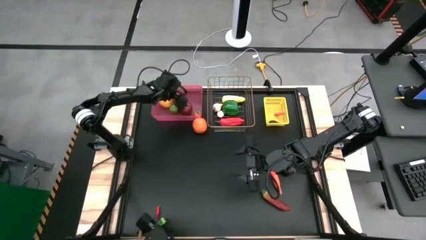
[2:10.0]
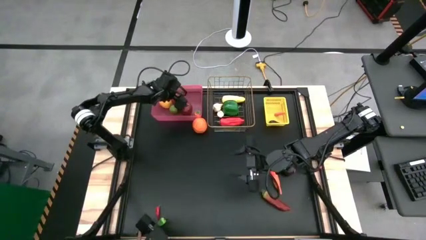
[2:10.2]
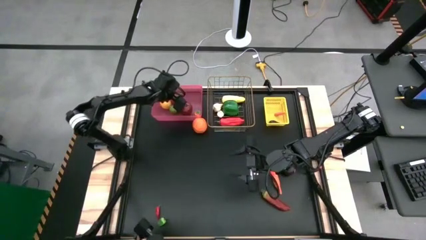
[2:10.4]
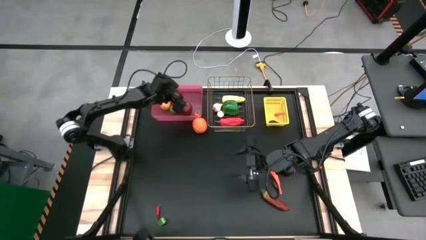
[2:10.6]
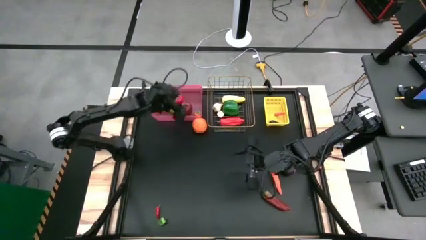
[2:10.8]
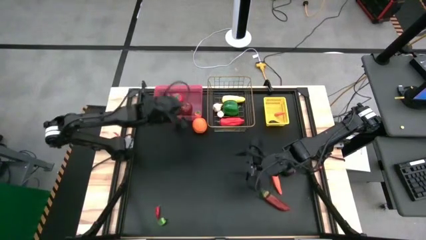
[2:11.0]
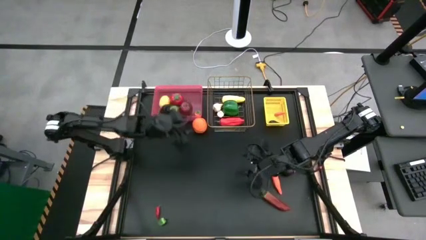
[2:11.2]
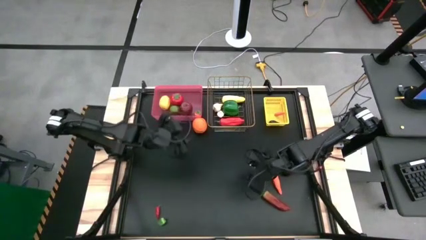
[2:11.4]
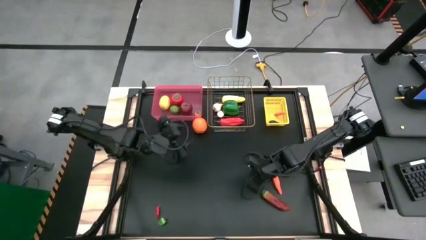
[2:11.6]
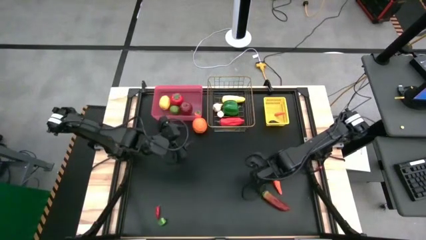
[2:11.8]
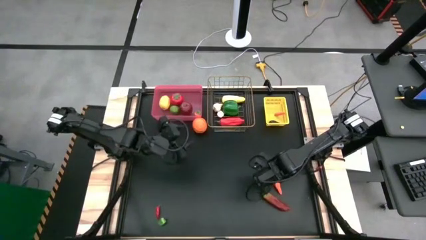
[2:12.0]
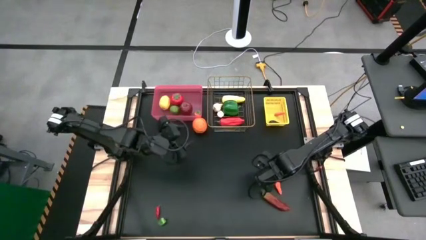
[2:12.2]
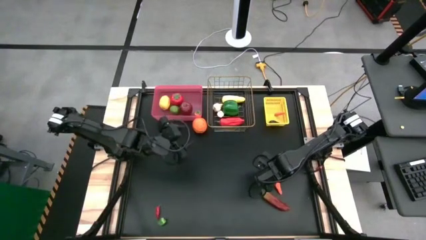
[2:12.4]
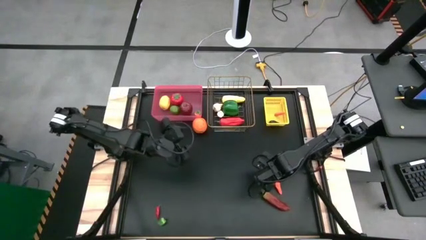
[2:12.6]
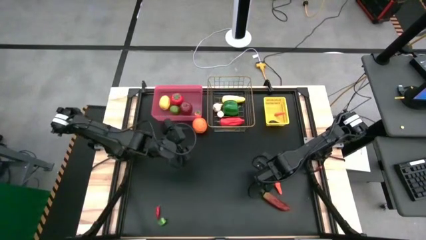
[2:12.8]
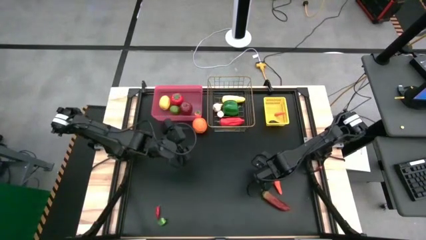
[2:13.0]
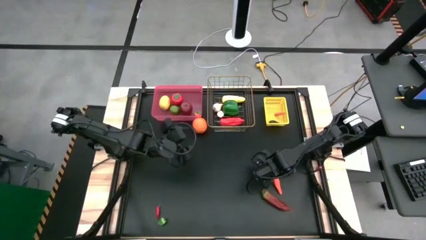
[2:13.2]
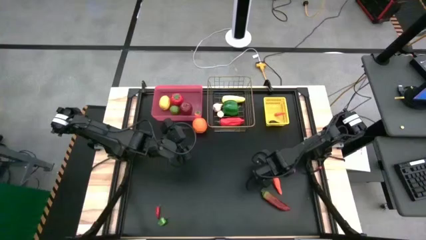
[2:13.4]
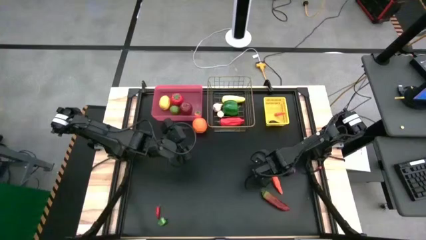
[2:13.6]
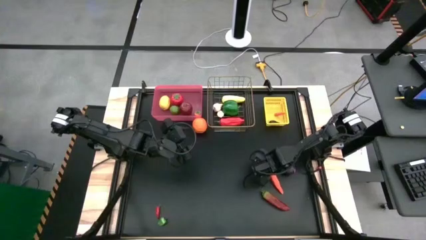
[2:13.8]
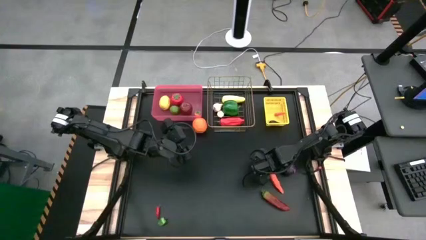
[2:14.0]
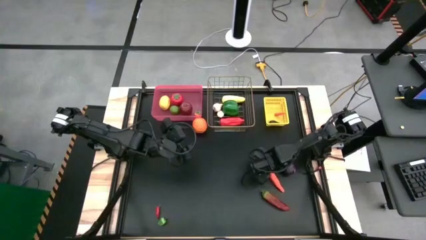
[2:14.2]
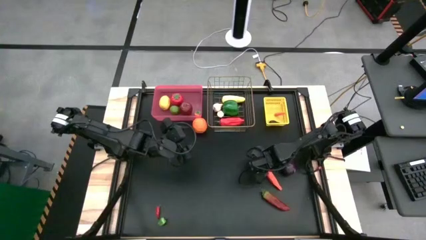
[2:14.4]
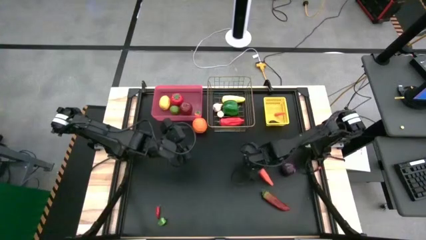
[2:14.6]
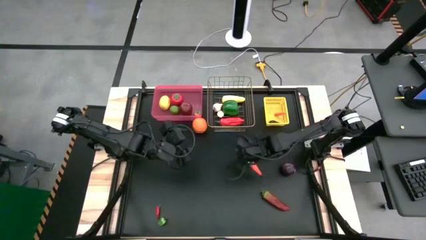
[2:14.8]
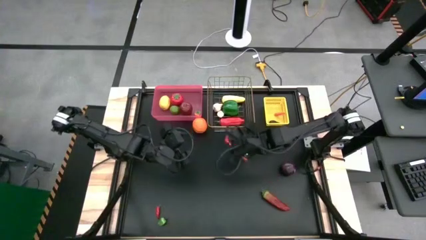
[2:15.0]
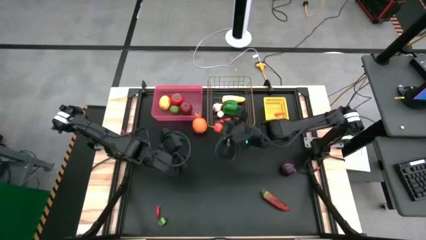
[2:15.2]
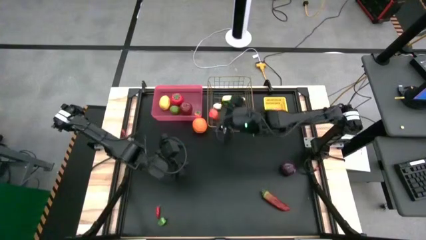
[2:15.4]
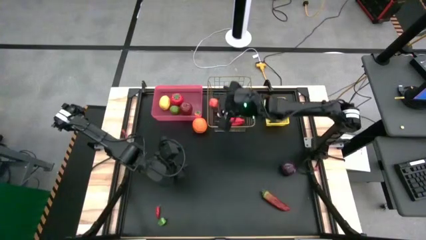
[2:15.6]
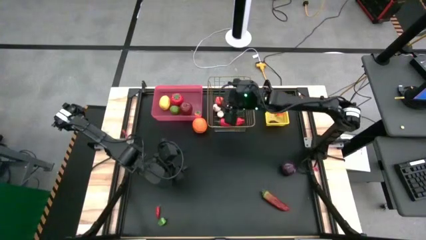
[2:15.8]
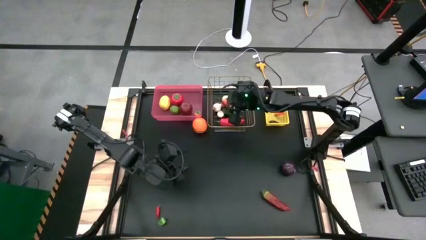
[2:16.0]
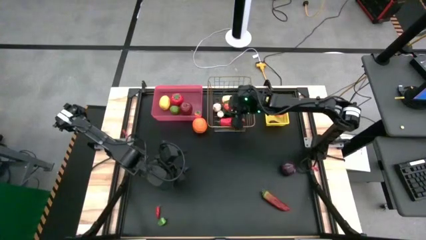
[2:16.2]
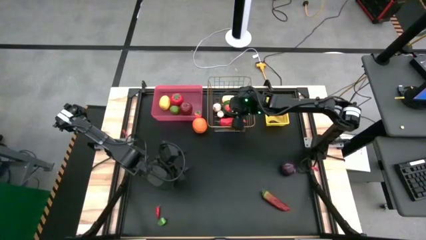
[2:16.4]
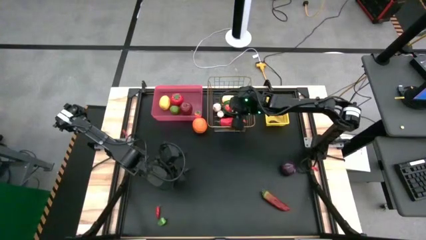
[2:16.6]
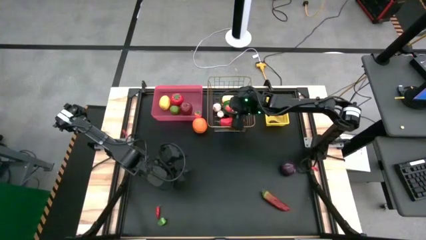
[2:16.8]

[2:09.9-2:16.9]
Task: Sort produce into baskets
Put the big orange carrot into the gold mesh basket

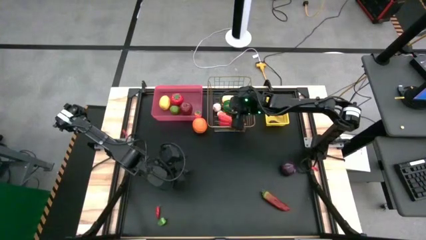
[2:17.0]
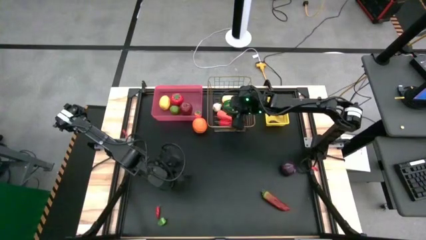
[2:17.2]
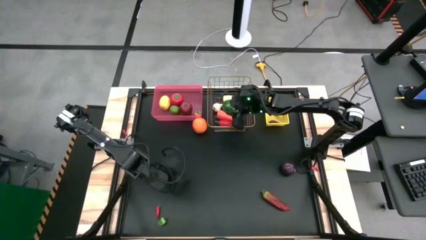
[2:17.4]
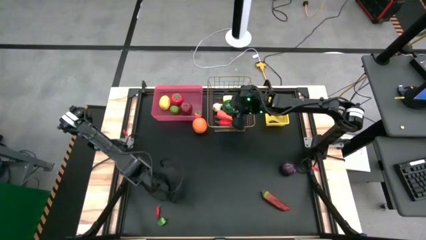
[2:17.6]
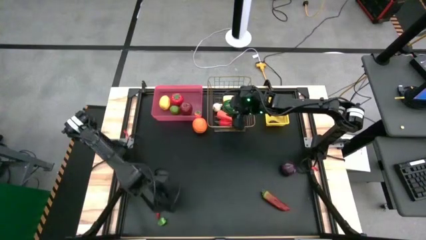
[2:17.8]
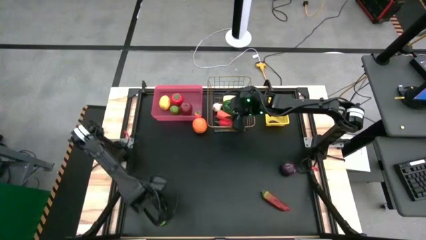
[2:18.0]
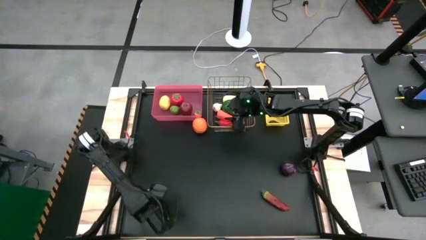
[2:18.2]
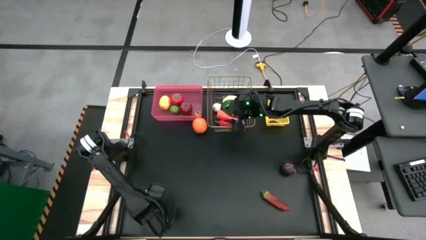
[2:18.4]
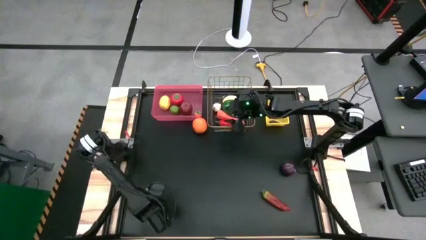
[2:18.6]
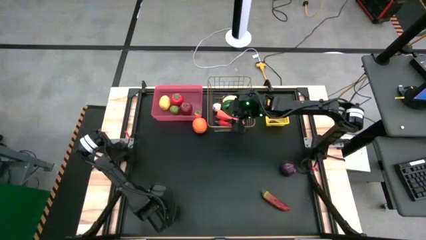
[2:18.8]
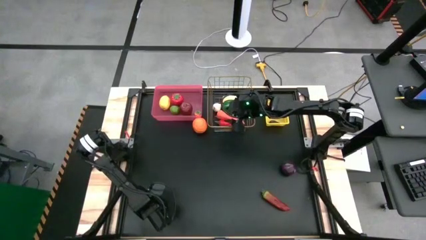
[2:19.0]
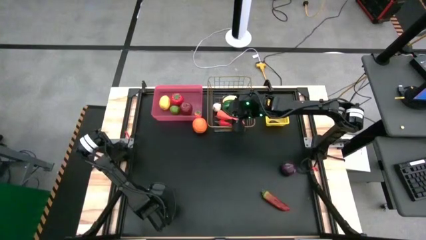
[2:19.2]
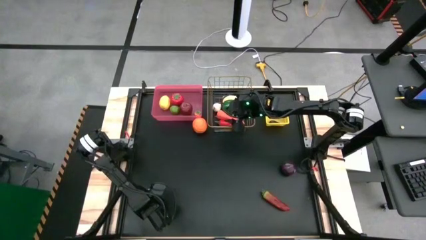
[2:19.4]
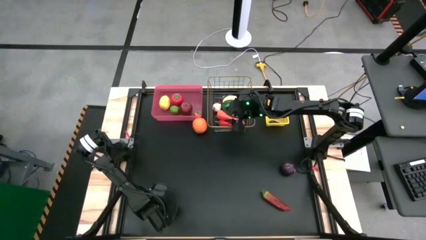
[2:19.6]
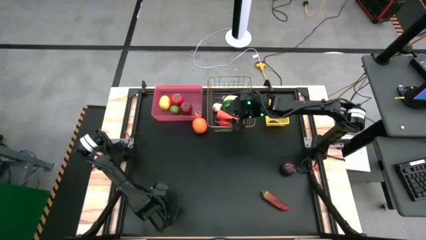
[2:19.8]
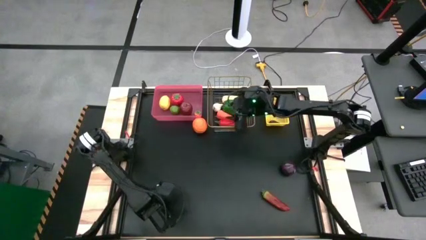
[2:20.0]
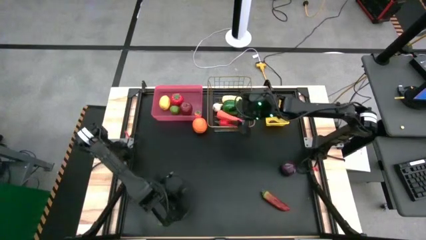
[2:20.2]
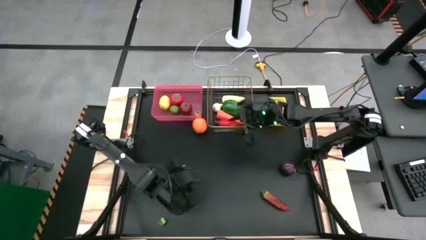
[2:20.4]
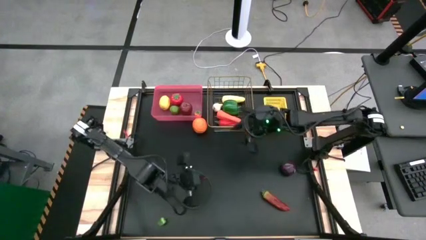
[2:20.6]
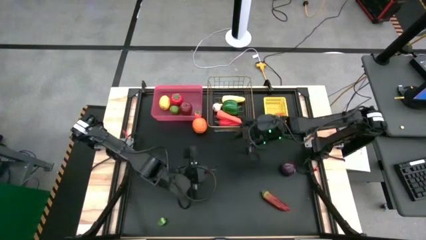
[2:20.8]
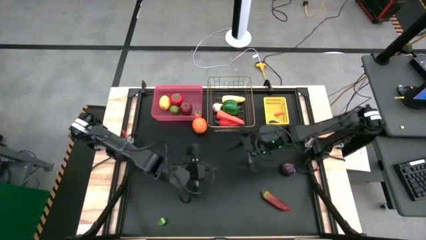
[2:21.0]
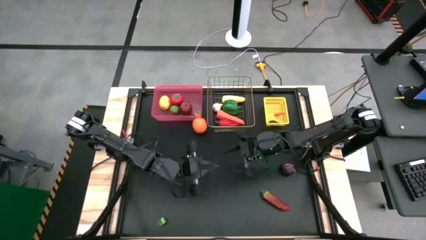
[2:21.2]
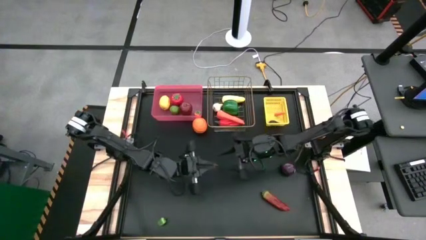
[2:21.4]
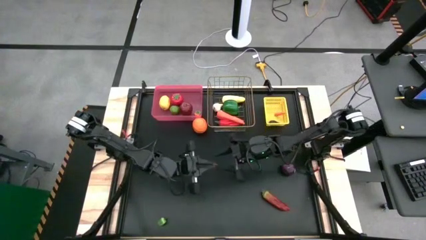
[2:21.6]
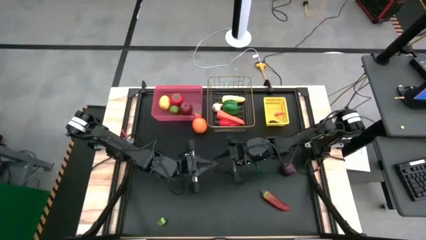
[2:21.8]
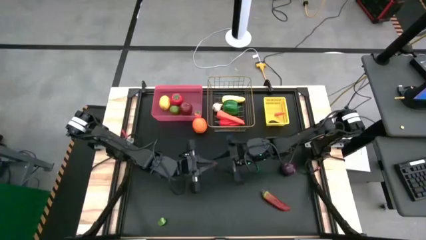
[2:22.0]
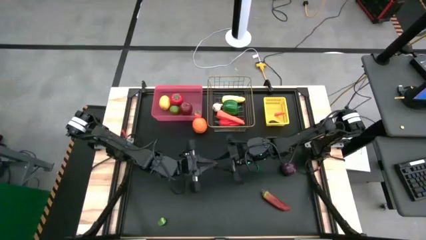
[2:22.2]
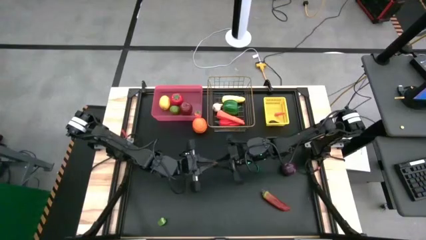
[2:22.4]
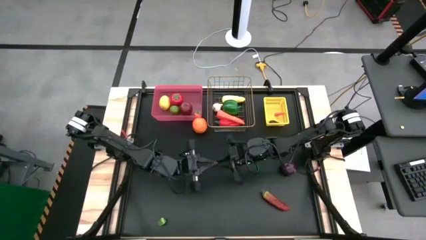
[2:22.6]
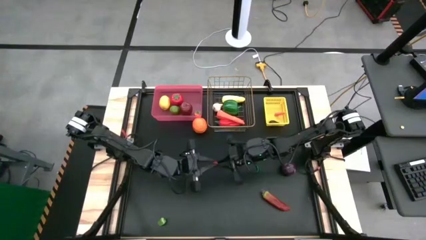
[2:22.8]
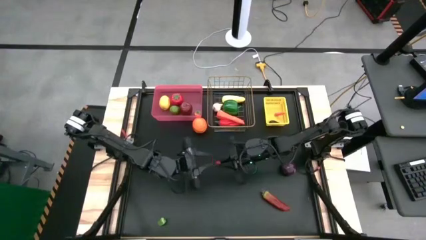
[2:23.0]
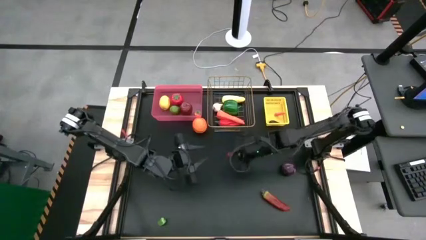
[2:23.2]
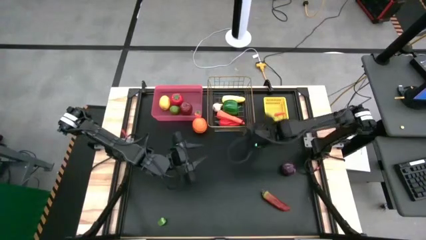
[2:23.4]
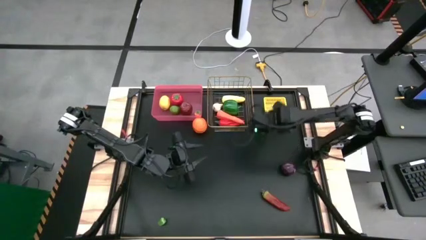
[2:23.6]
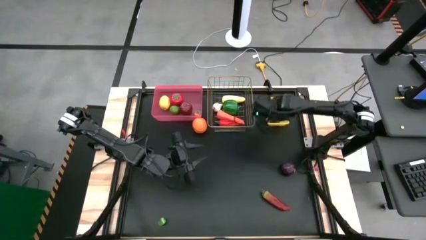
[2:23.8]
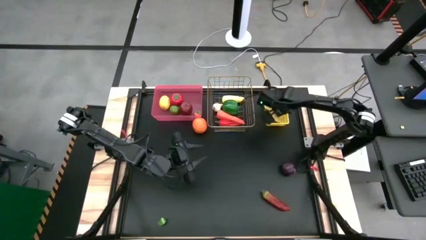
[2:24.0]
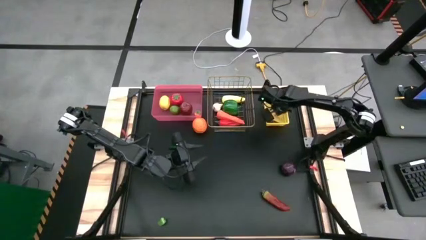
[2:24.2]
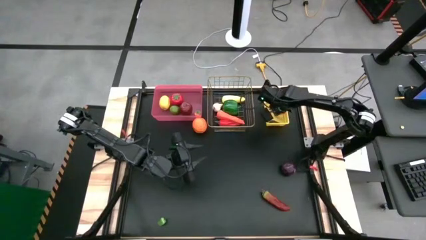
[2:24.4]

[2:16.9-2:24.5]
Put the small red chili pepper into the yellow bin

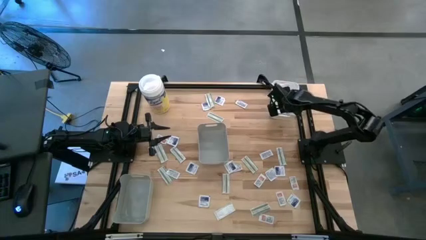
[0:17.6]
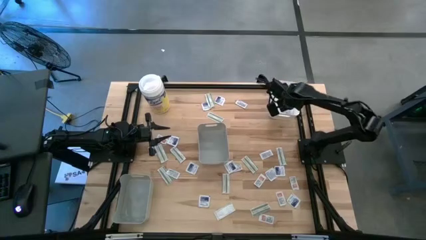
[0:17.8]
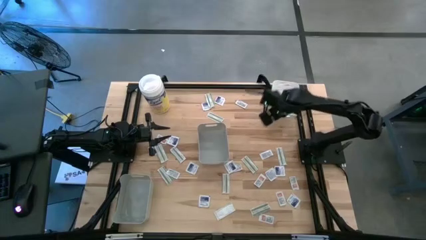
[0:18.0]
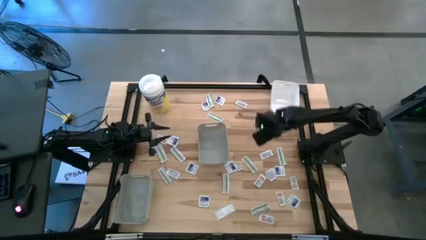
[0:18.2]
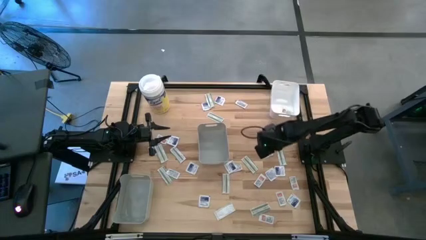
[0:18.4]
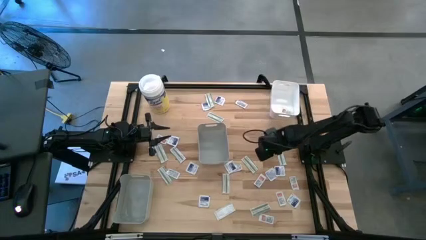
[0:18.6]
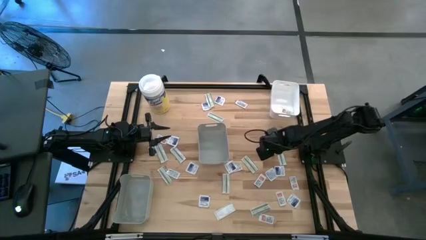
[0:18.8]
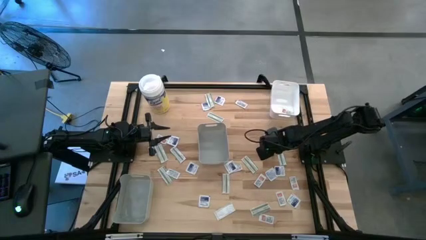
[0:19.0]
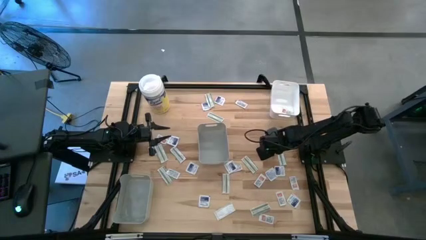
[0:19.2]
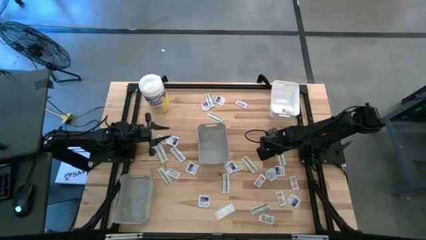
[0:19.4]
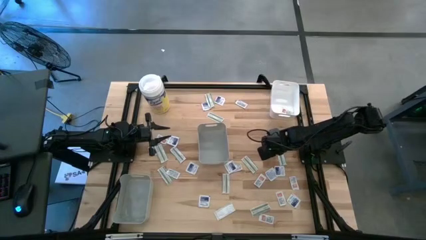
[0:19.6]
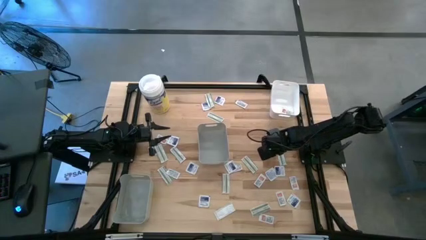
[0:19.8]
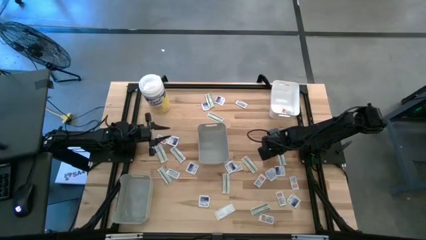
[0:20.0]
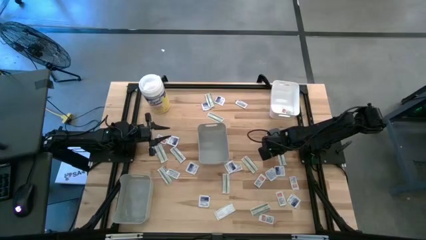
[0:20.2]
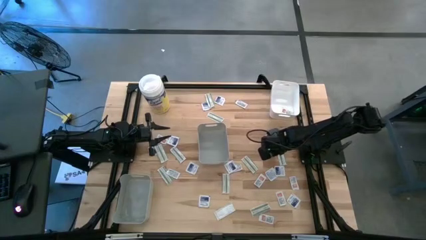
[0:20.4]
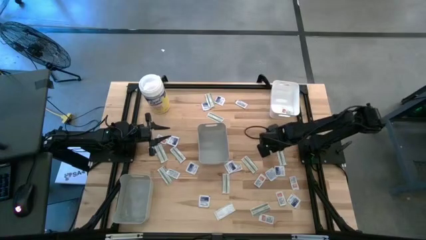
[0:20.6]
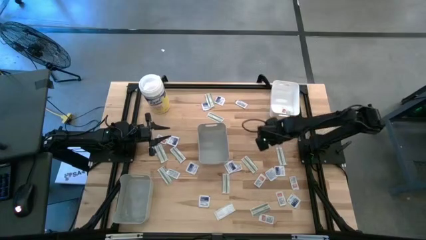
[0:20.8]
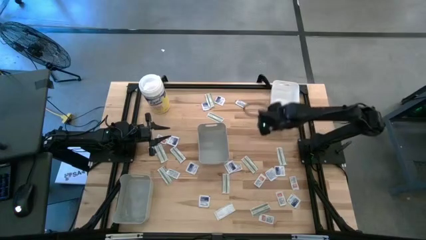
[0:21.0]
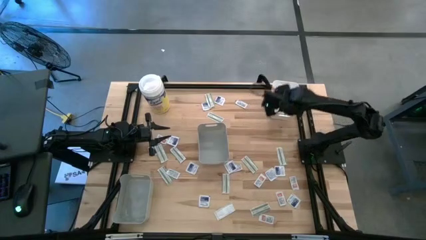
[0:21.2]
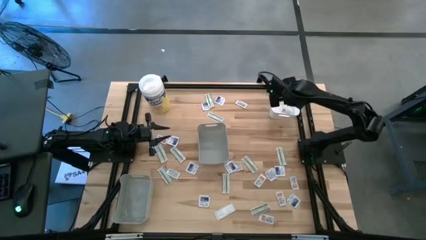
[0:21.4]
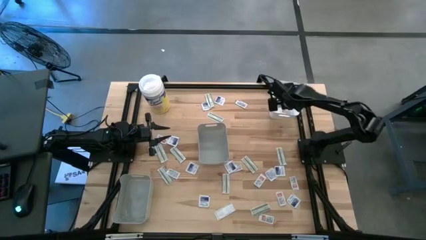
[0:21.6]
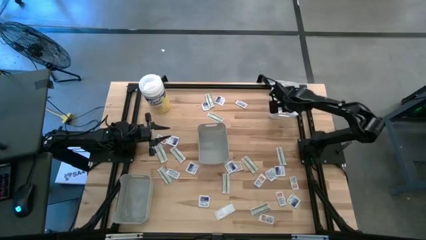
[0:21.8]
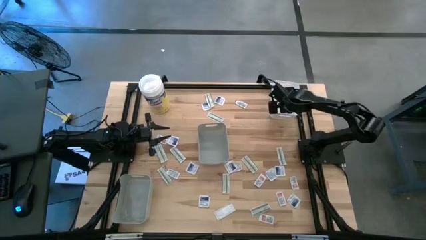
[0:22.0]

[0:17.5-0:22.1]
Task: Pick & Place First Aid Supplies
Put the orange pad into the white bin
